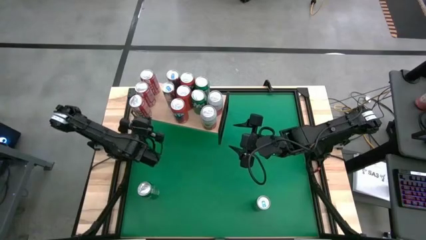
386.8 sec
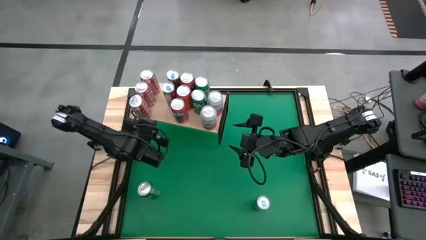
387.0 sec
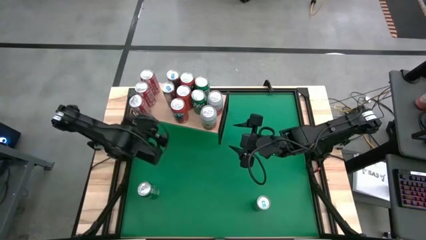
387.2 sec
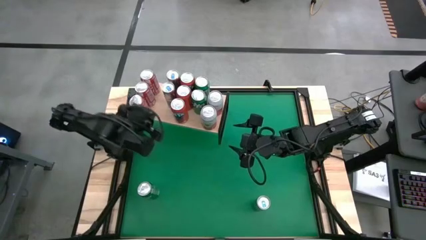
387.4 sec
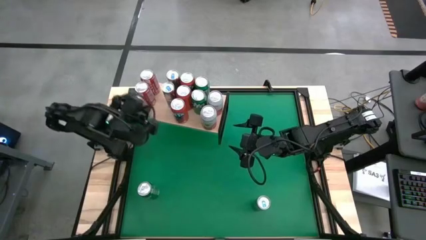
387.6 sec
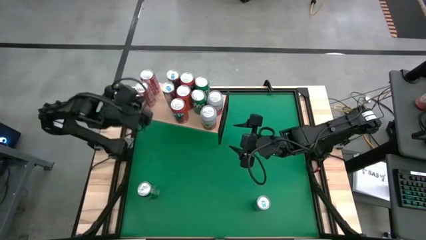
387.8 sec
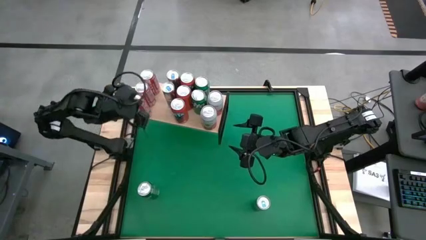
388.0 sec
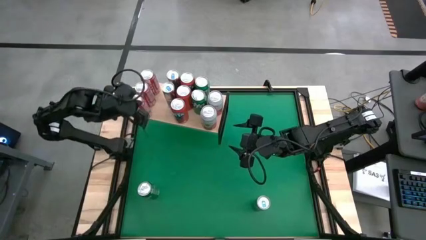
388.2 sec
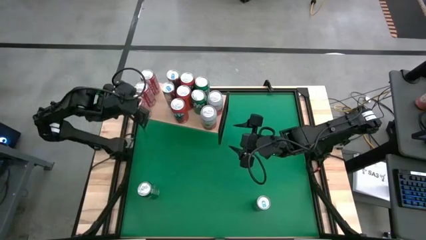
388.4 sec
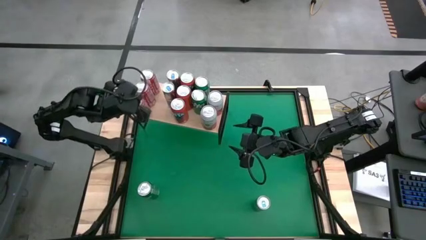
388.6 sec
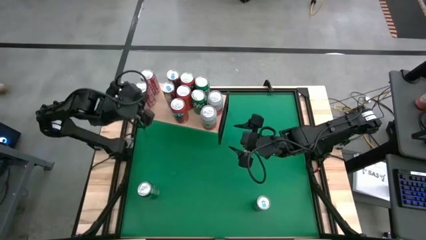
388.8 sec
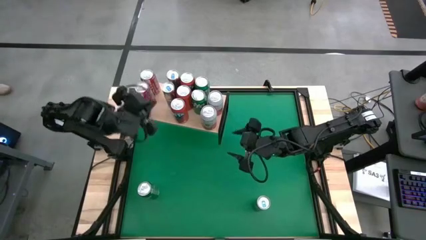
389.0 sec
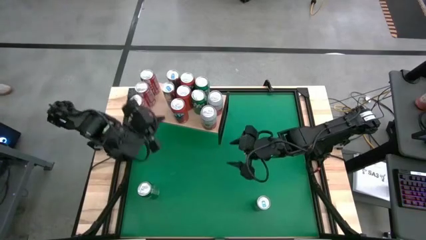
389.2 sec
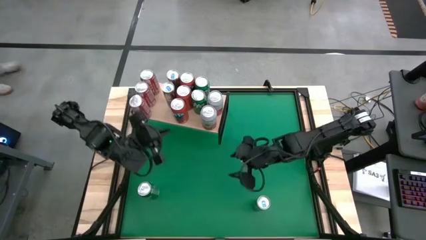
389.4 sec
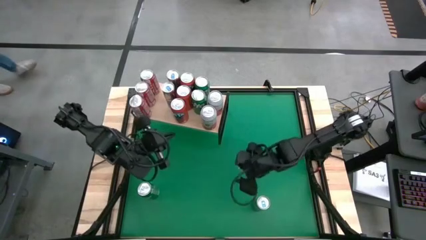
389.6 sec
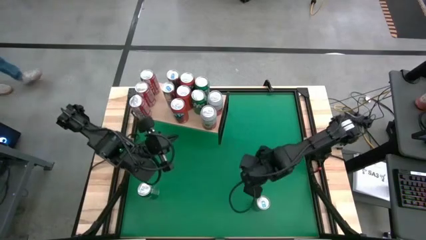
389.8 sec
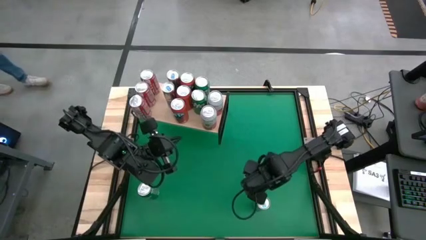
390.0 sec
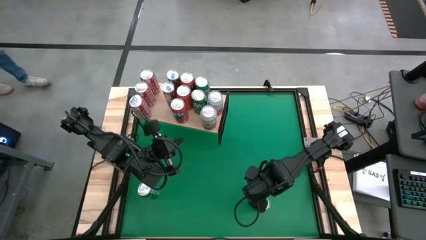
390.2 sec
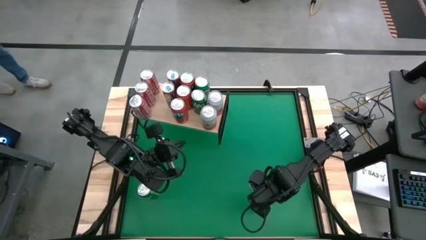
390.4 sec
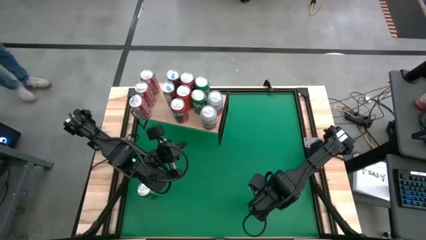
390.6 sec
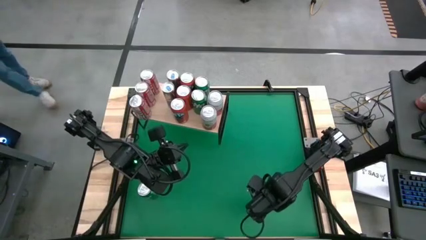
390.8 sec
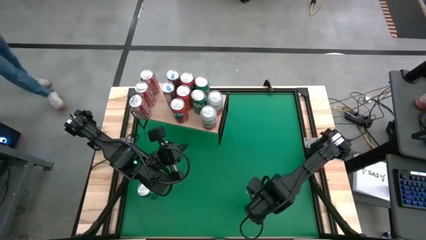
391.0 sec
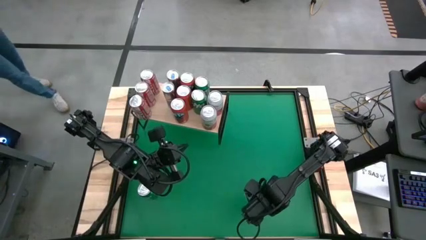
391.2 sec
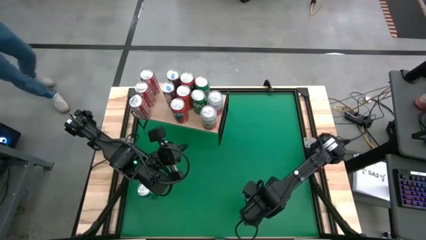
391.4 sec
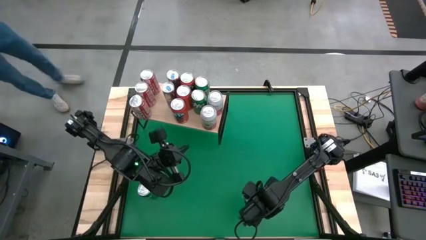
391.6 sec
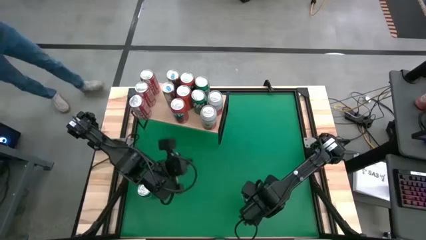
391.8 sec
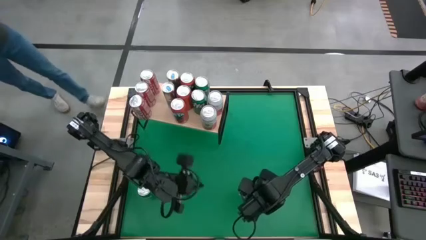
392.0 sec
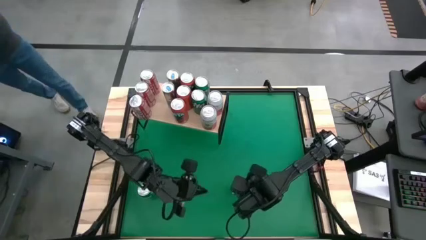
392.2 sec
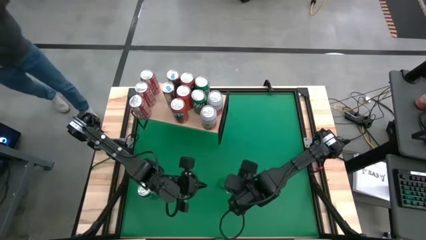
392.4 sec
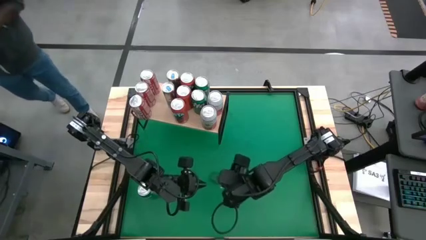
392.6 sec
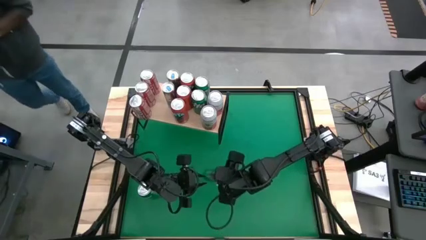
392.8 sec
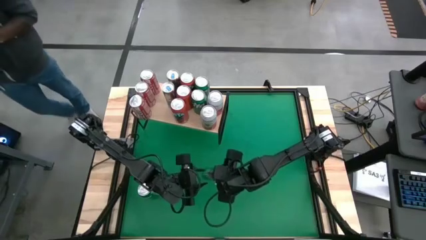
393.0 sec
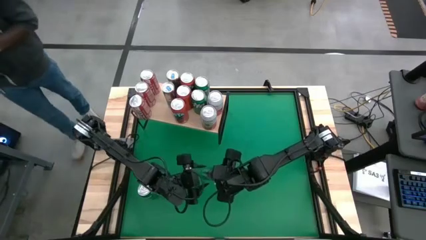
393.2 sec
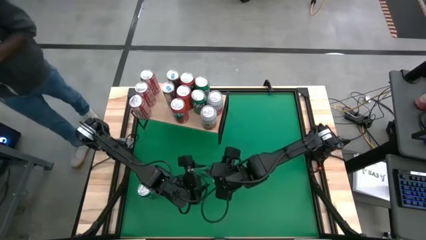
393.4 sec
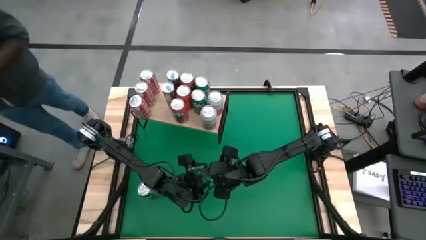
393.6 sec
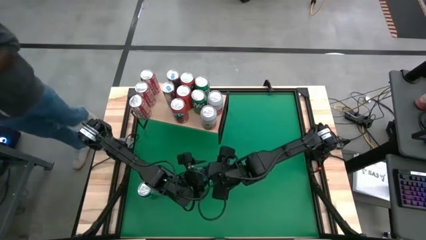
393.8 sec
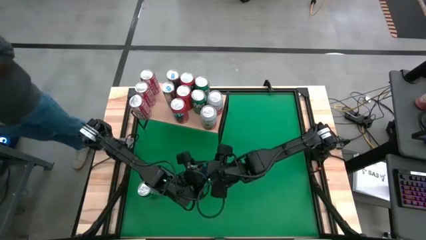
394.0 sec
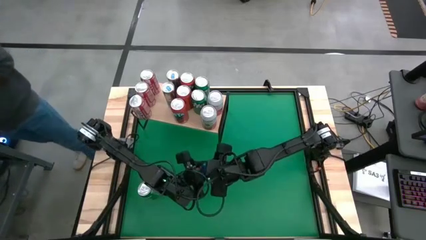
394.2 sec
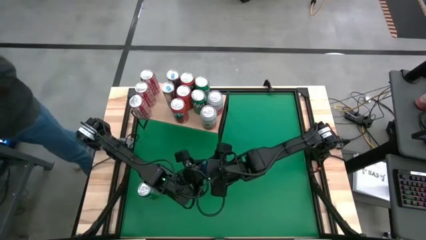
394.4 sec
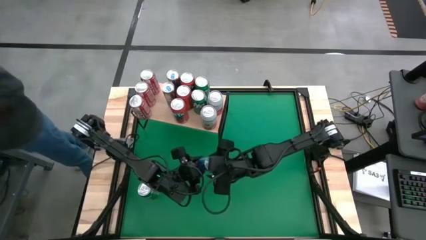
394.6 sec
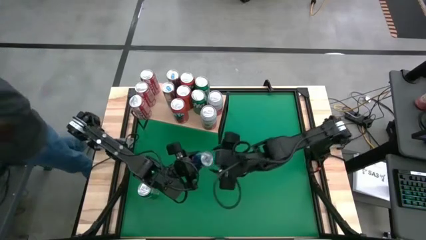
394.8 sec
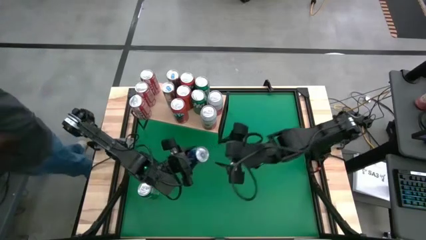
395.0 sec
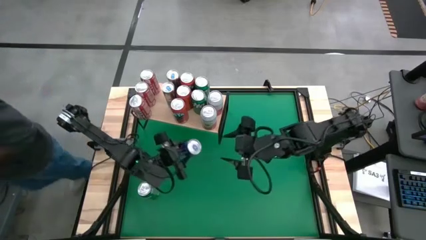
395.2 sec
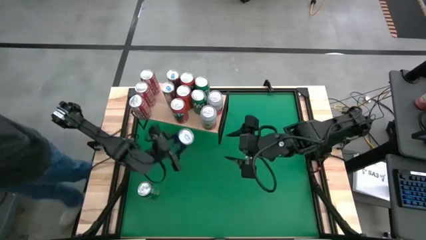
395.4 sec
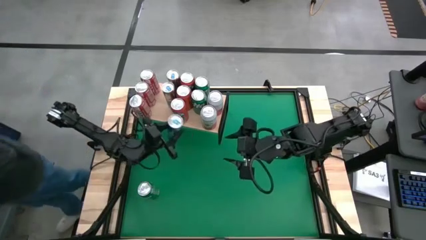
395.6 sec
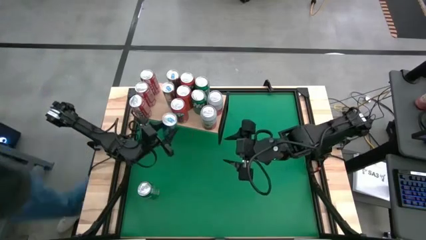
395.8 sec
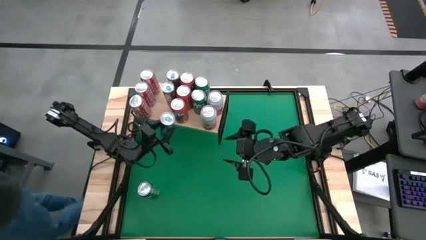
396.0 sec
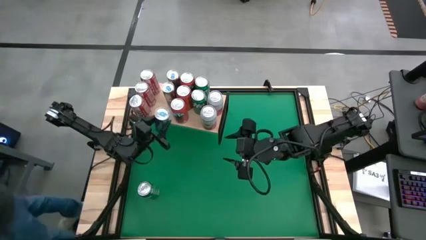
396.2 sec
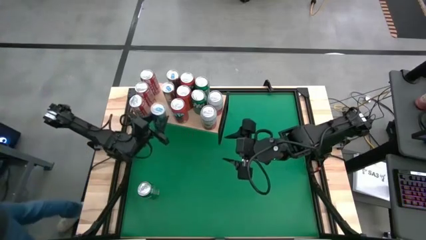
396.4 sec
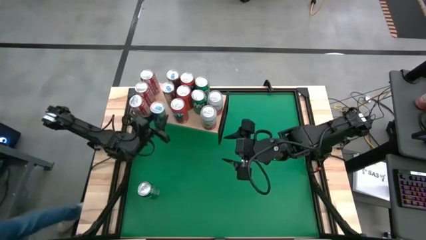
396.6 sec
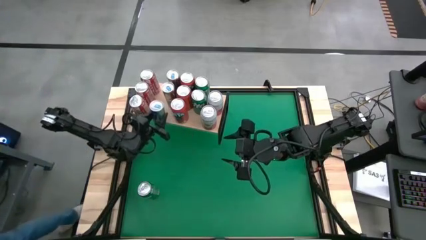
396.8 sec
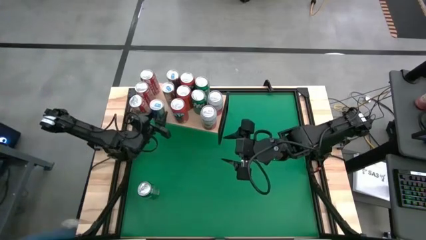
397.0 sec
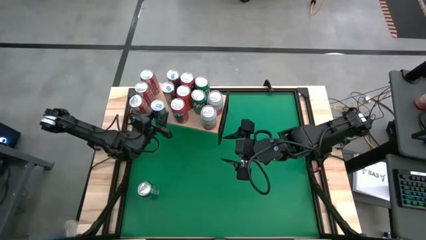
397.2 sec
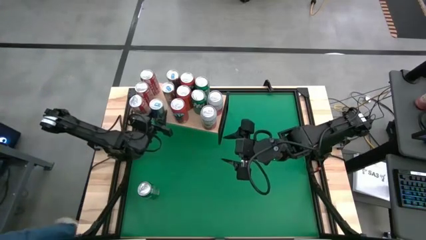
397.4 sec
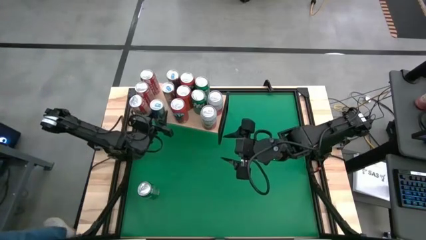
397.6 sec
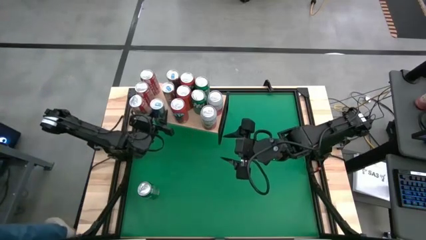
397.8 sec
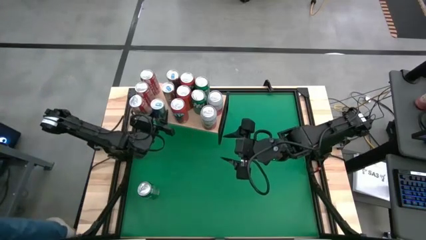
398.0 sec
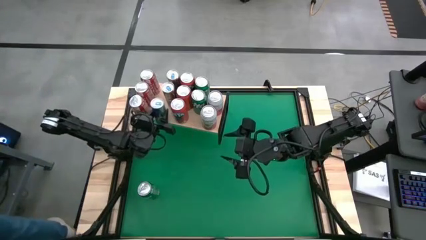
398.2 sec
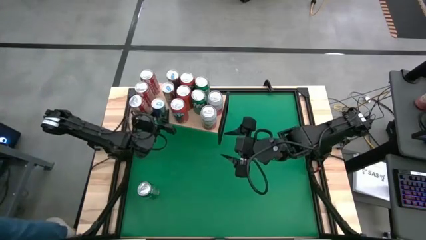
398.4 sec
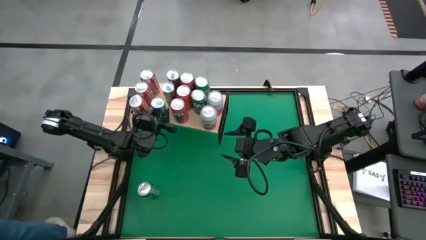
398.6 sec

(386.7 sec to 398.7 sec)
Task: Place canned beverage on shelf
Put the blue/white soda can on the shelf aligned with the other blue/white soda can

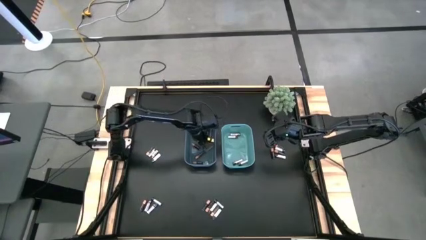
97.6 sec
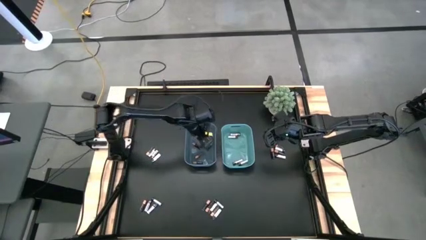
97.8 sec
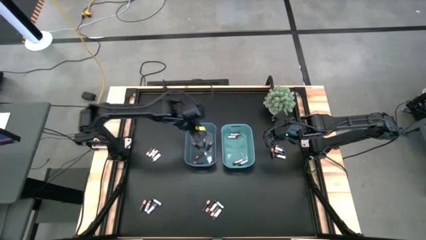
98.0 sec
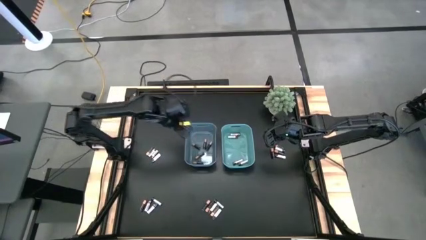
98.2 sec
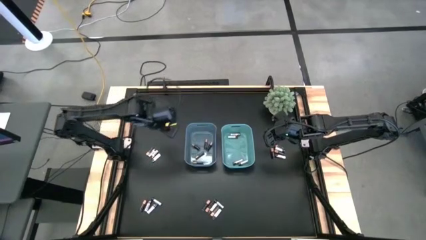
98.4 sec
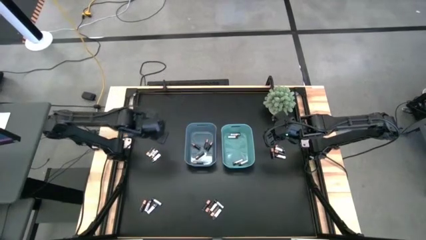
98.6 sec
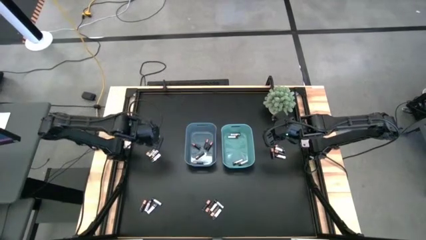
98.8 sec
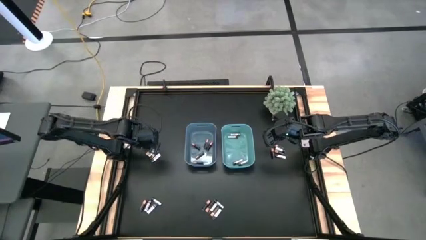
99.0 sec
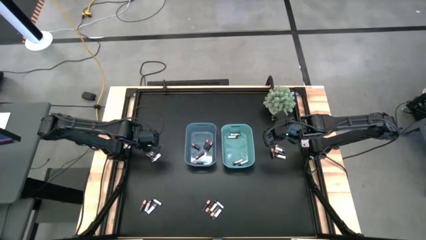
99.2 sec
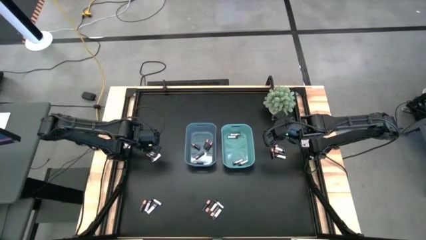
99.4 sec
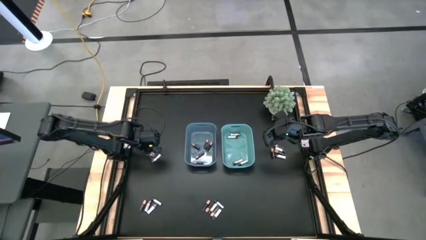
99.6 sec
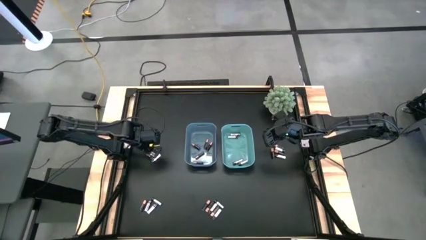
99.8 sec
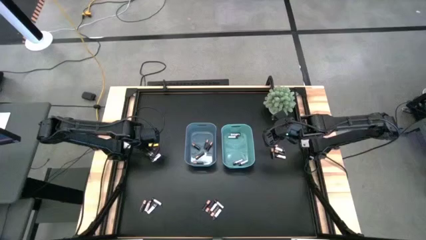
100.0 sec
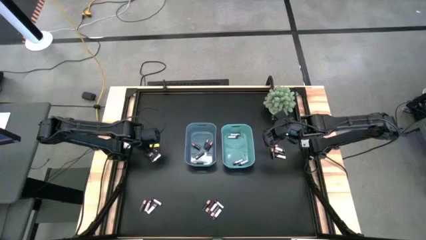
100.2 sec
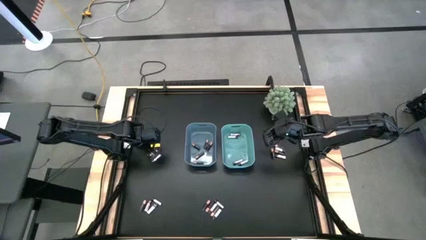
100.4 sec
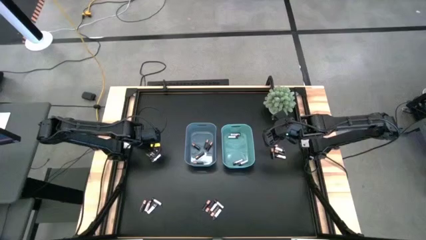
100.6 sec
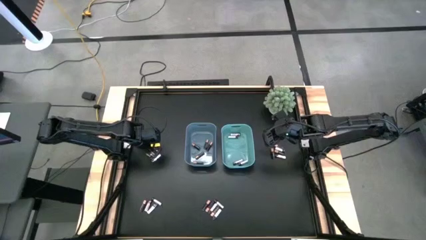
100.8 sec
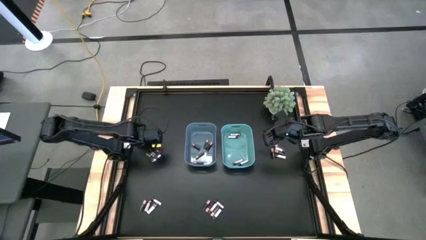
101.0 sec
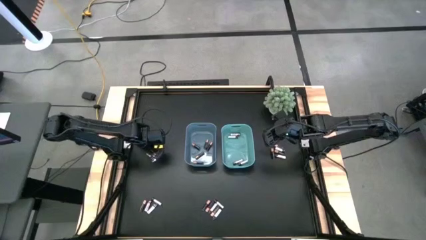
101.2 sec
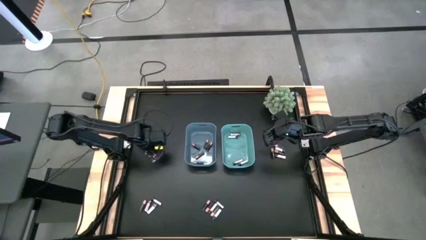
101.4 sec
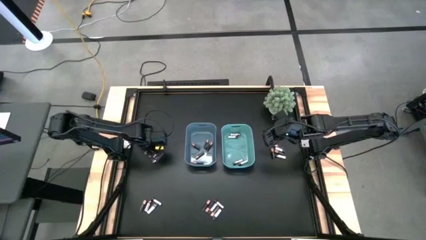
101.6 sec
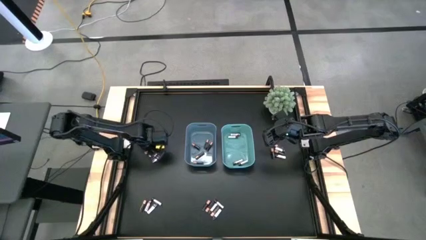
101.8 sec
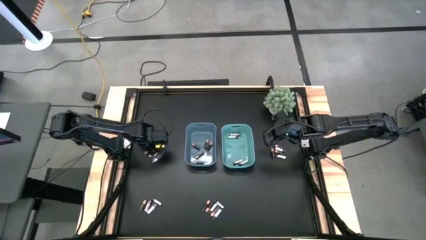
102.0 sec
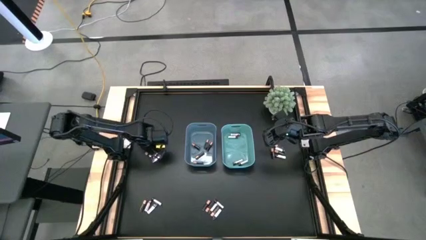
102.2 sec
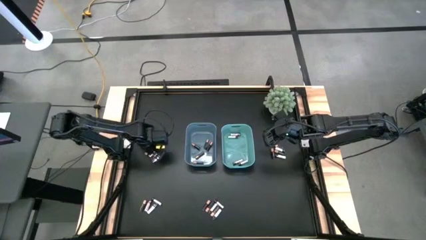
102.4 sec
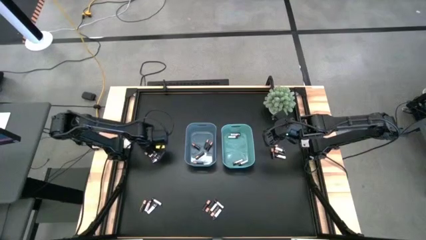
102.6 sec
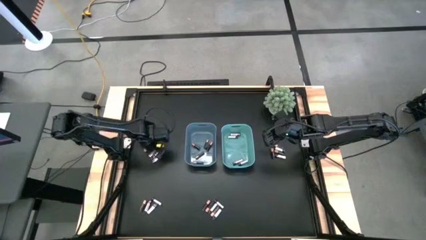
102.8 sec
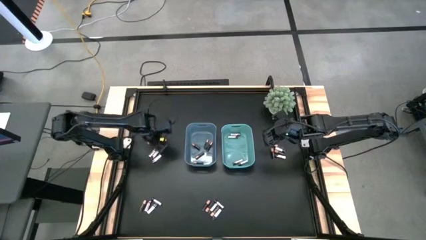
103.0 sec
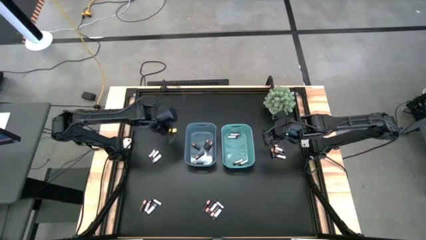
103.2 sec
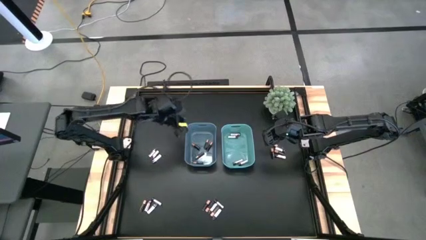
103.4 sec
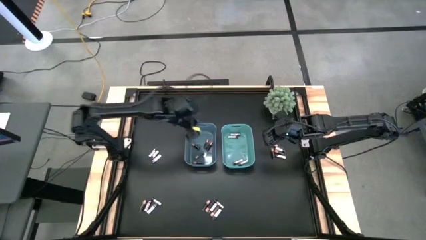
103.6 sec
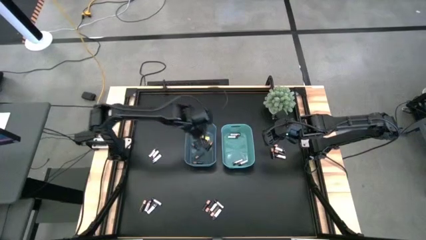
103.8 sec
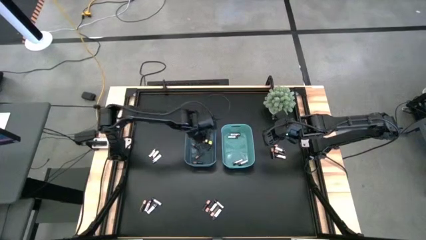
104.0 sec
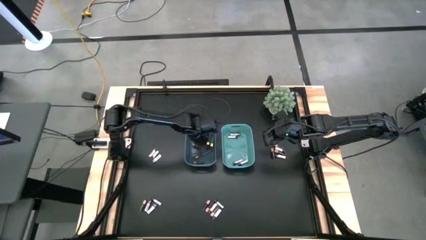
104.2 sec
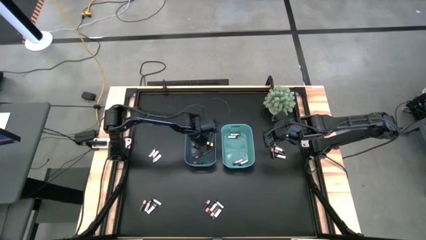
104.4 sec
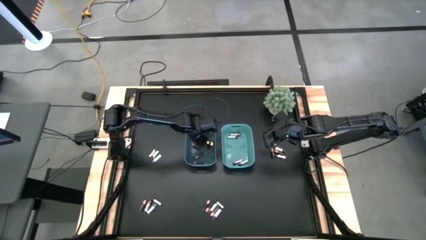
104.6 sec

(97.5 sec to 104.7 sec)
Task: Sort batteries
Put the black battery into the blue bin
